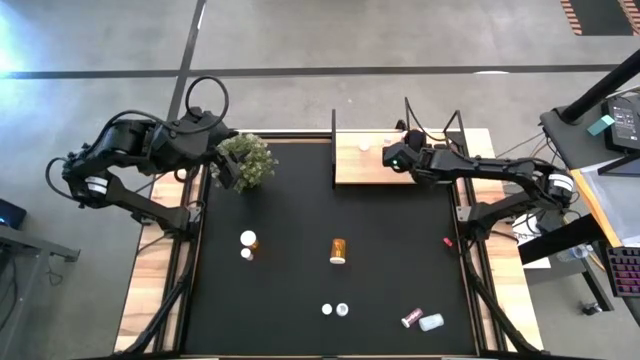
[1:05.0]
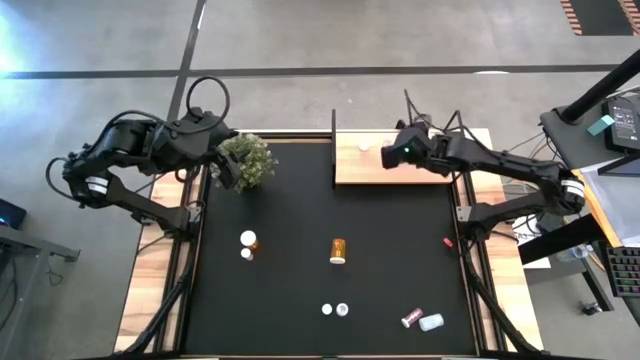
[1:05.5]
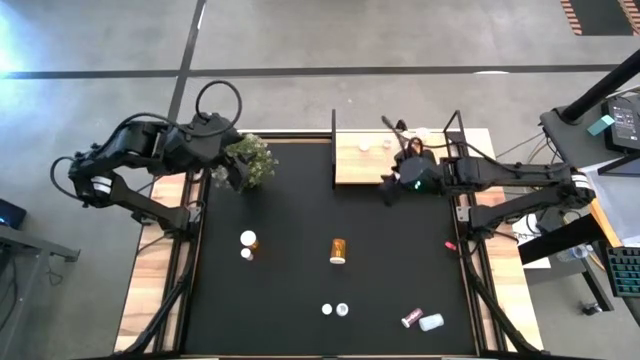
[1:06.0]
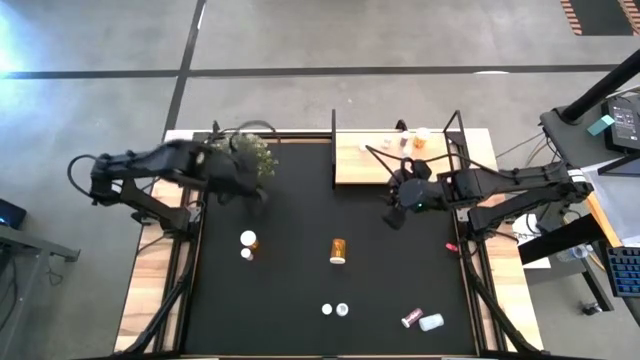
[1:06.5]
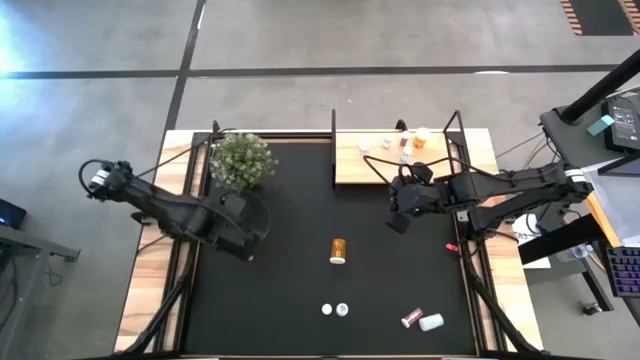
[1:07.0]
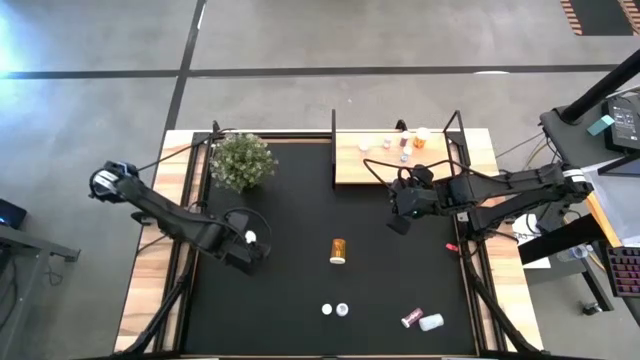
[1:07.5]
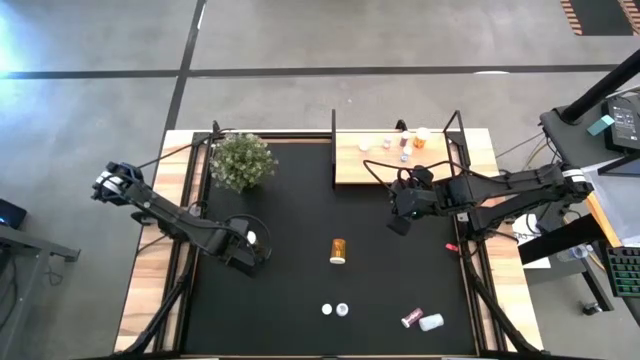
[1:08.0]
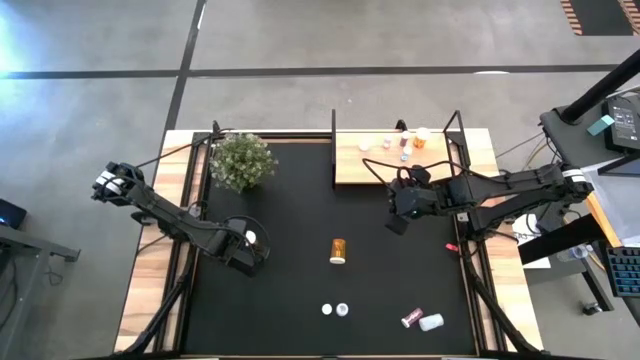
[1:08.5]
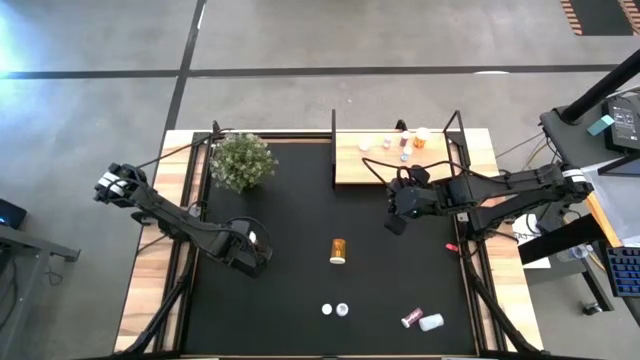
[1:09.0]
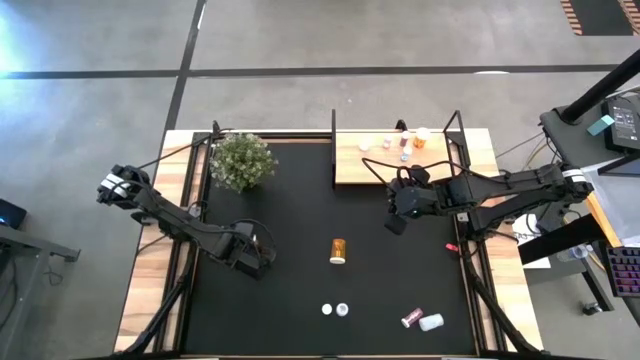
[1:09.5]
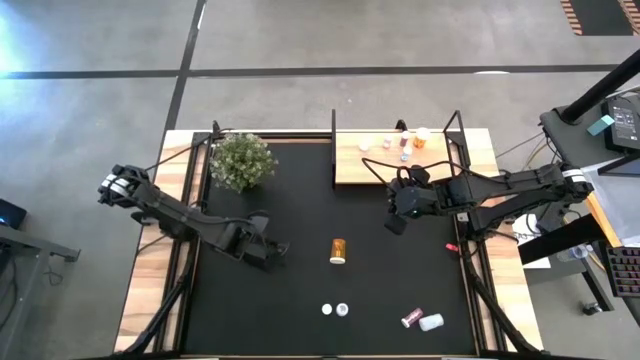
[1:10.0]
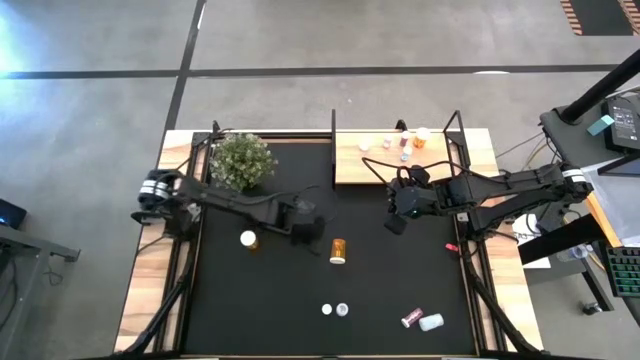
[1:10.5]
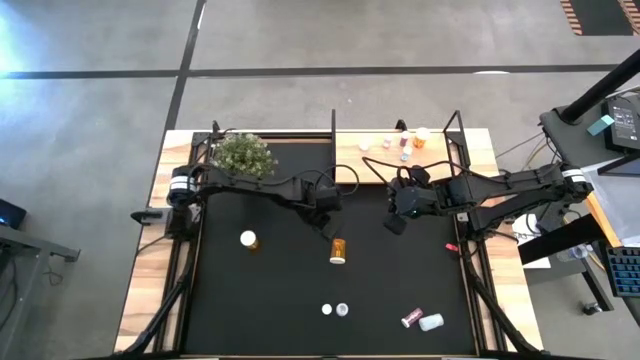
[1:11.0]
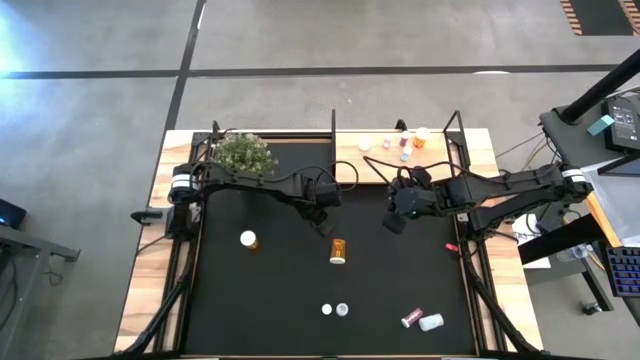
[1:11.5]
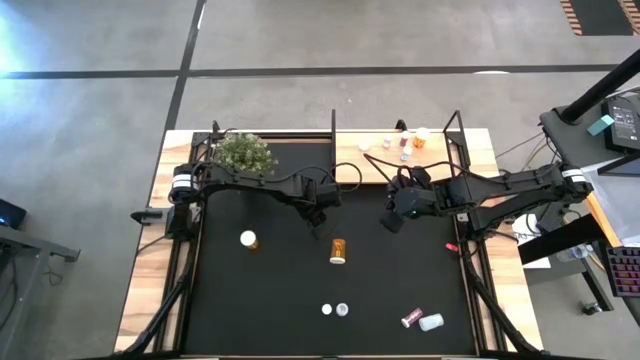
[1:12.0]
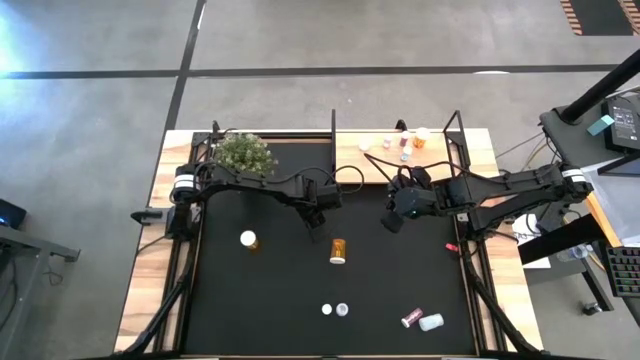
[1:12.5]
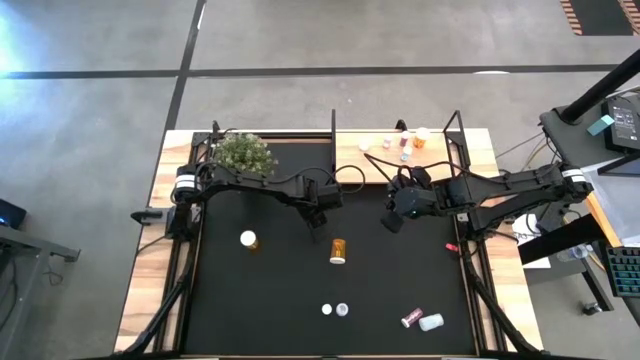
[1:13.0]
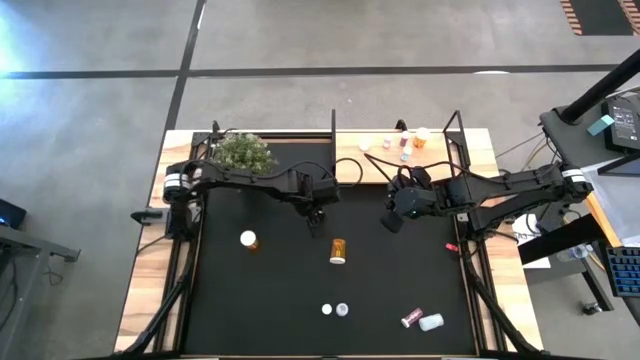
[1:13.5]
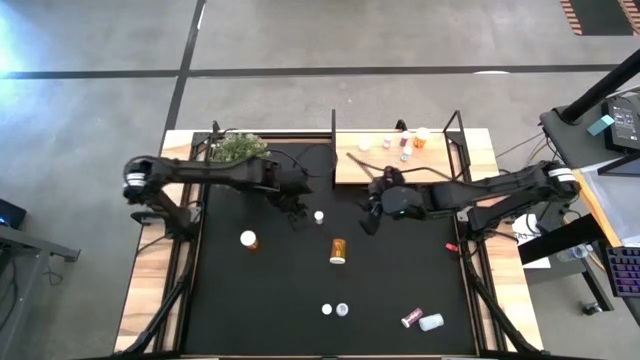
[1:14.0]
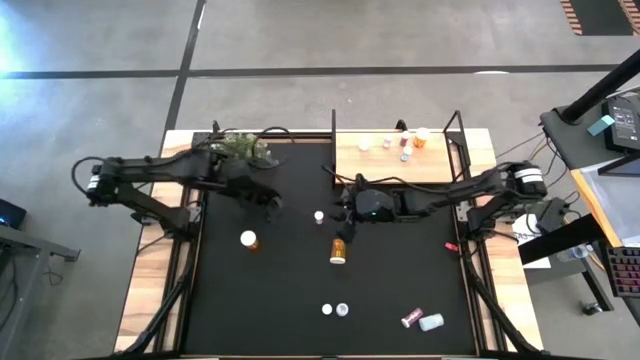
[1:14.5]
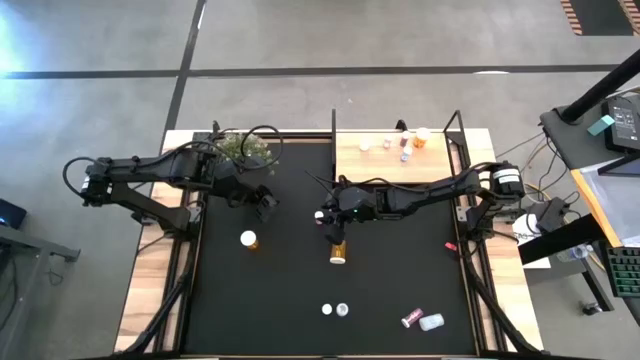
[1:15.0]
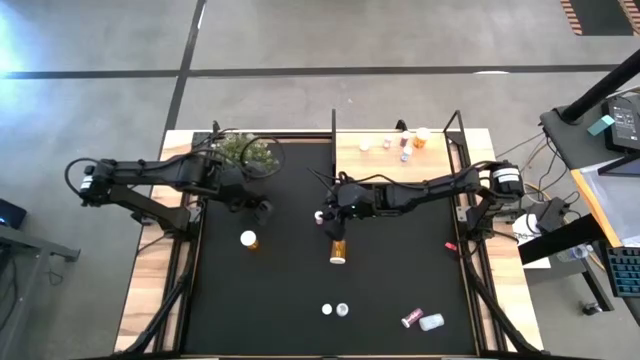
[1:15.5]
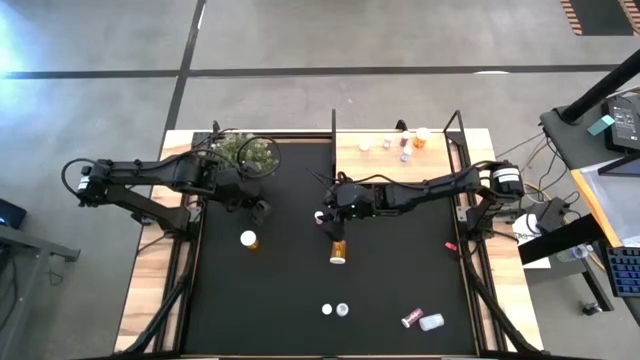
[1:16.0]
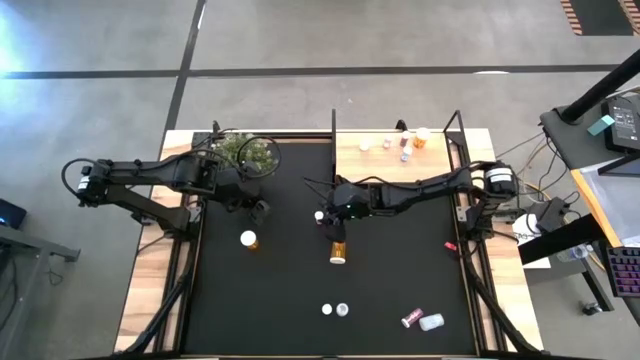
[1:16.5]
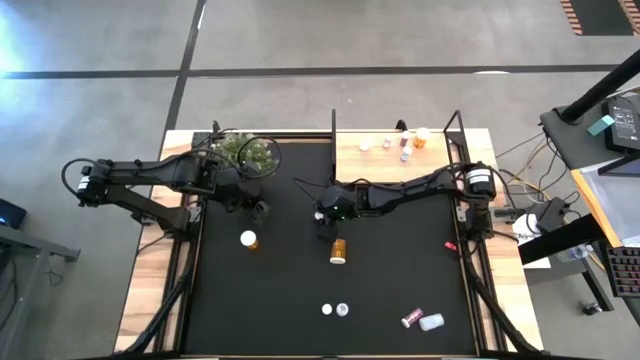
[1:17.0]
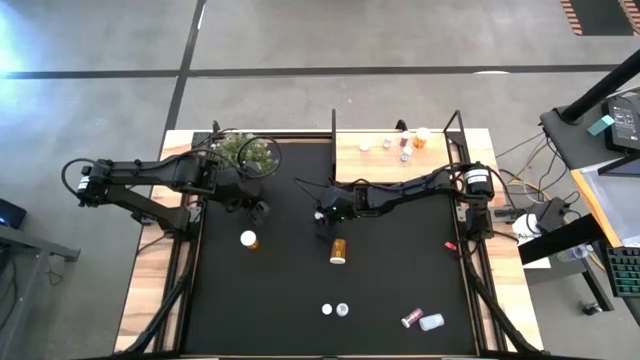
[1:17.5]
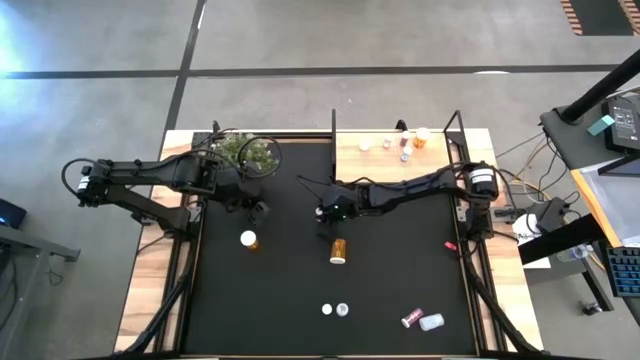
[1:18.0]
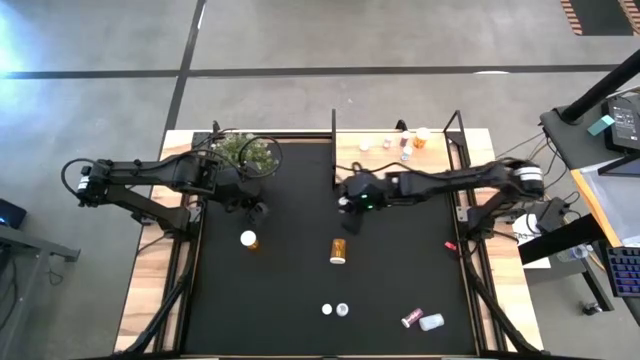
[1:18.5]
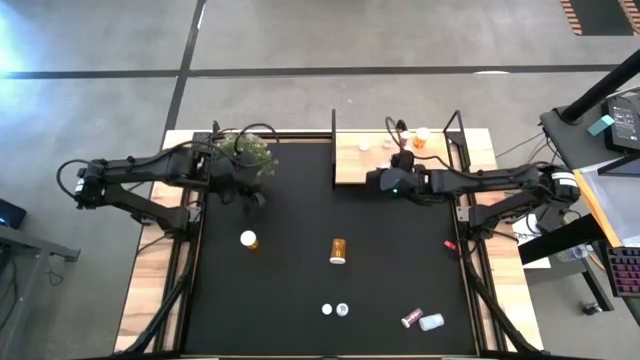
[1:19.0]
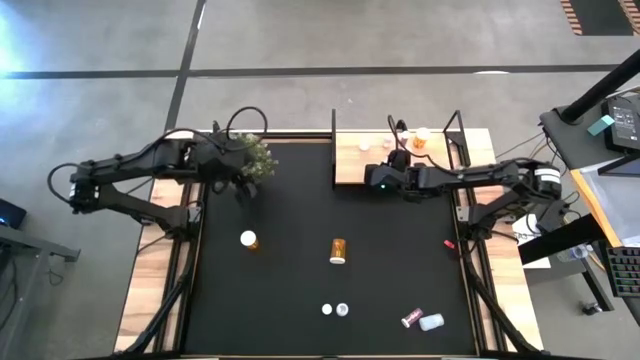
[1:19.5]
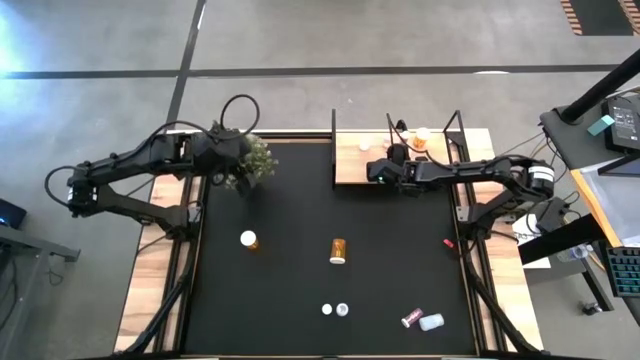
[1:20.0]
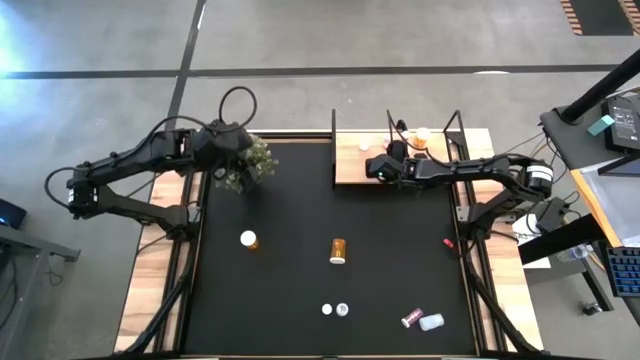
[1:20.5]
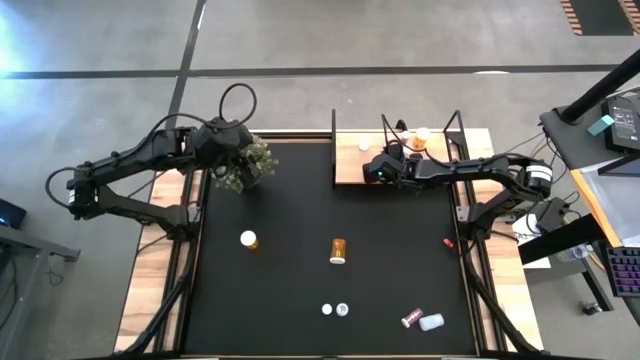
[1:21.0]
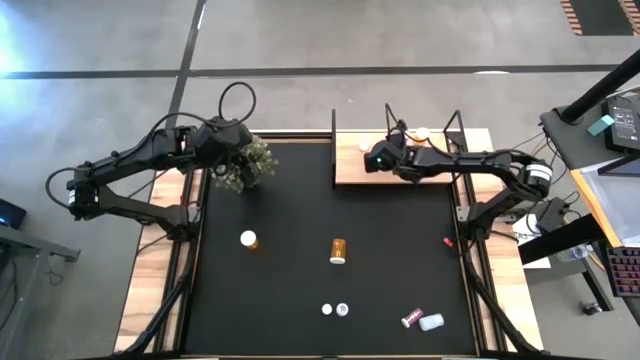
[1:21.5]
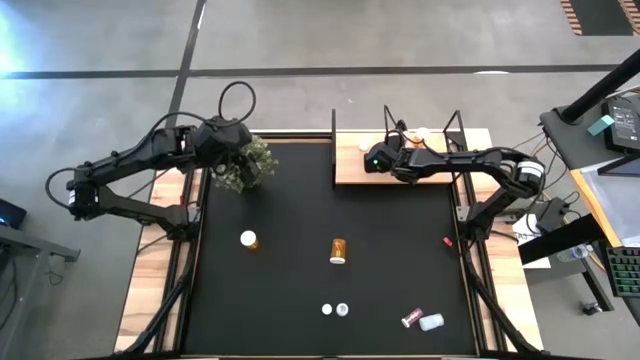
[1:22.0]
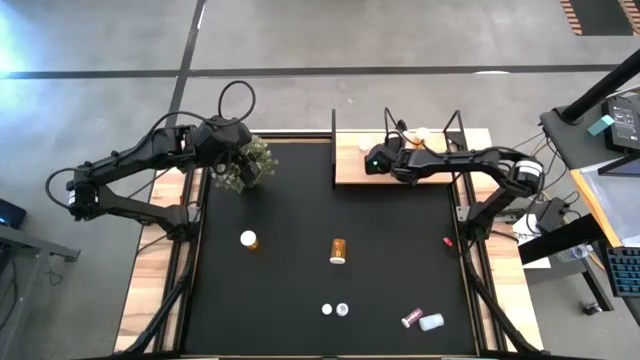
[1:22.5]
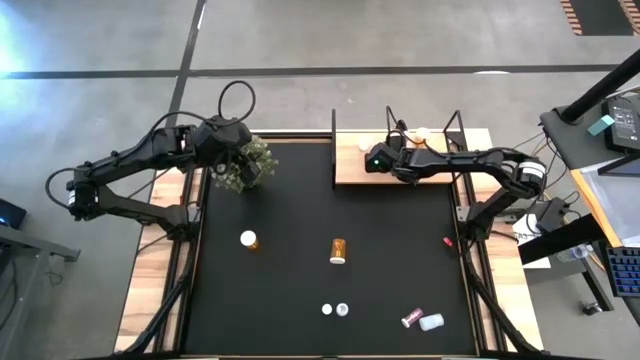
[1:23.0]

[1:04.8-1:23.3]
Task: Pick and place medicine bottles onto shelf by color
Put the left pink pill bottle on the shelf aligned with the other pink pill bottle
